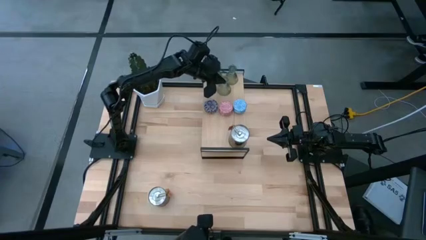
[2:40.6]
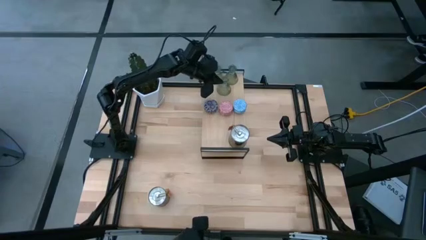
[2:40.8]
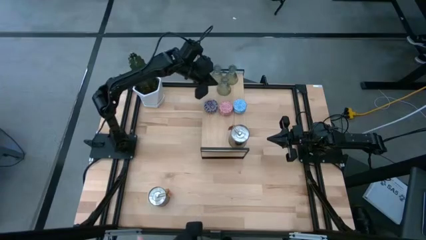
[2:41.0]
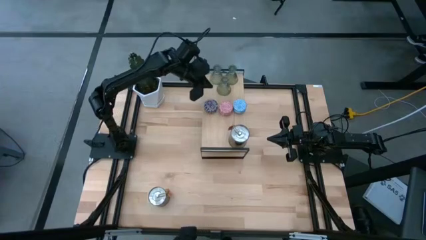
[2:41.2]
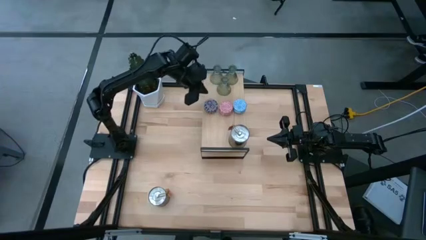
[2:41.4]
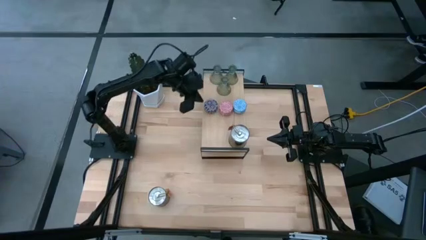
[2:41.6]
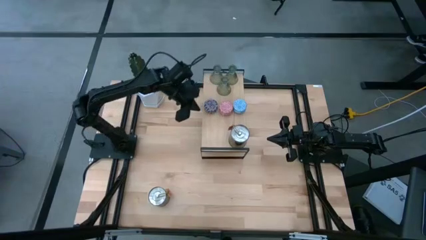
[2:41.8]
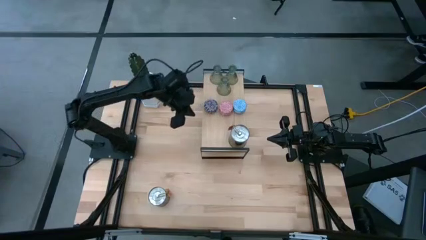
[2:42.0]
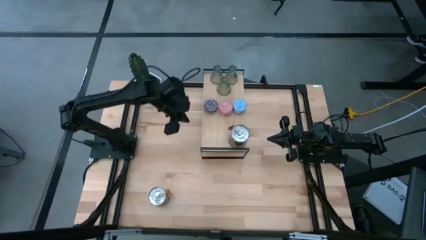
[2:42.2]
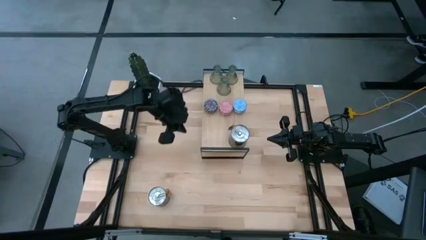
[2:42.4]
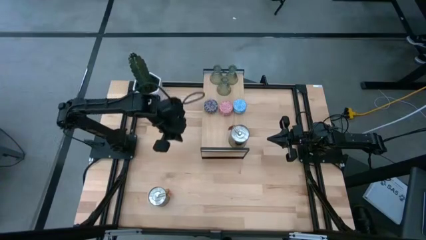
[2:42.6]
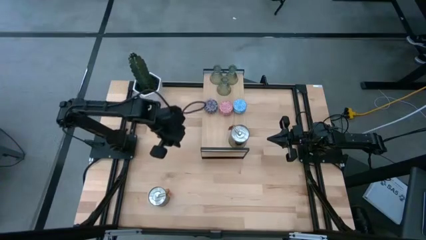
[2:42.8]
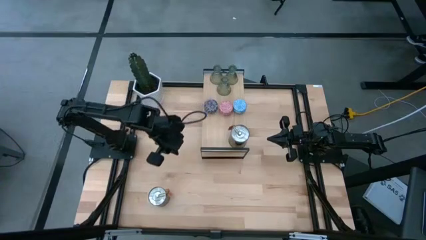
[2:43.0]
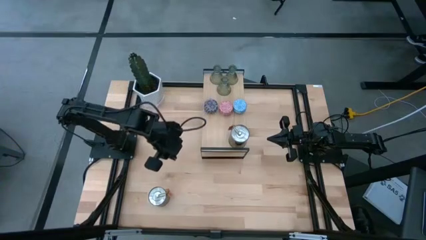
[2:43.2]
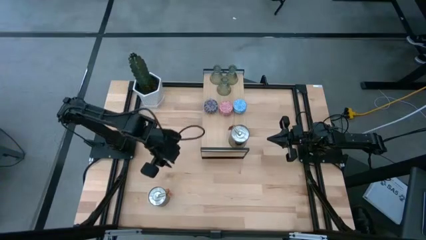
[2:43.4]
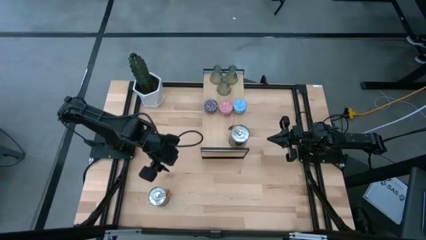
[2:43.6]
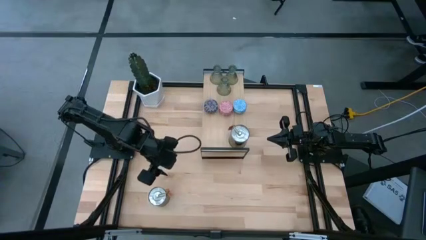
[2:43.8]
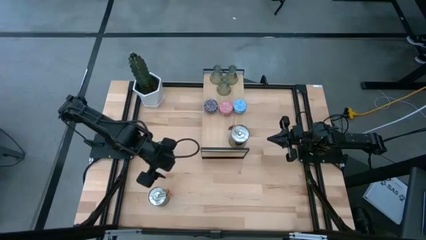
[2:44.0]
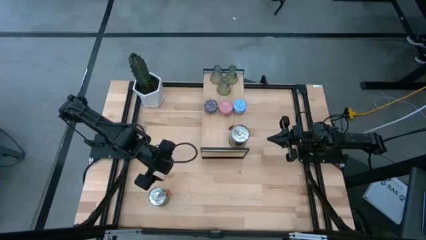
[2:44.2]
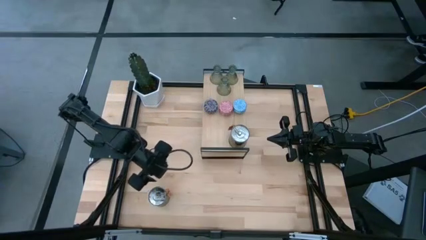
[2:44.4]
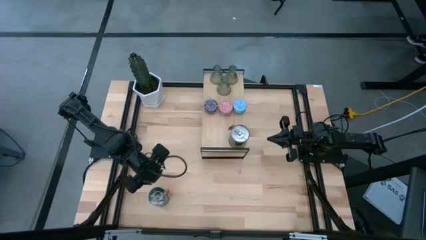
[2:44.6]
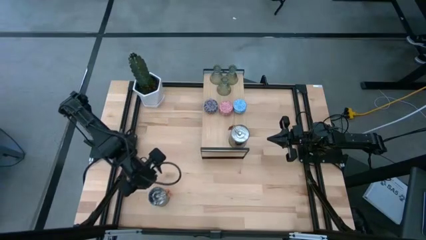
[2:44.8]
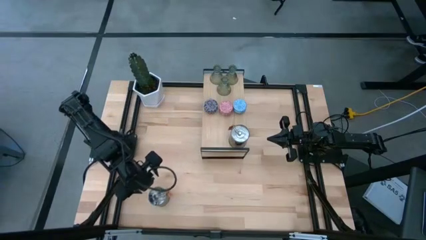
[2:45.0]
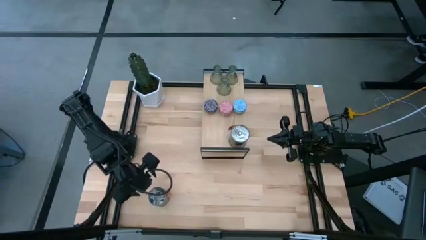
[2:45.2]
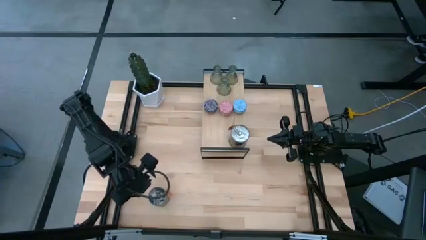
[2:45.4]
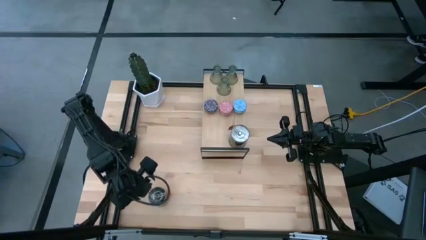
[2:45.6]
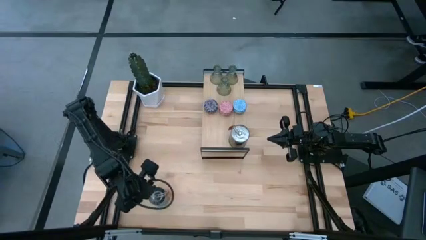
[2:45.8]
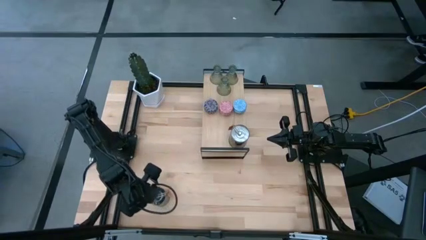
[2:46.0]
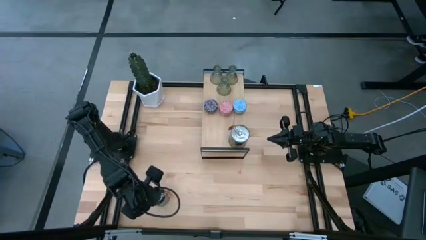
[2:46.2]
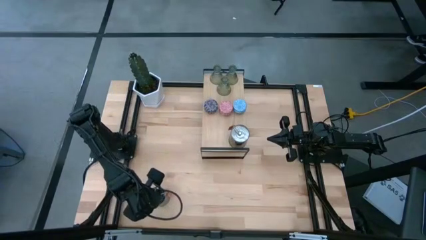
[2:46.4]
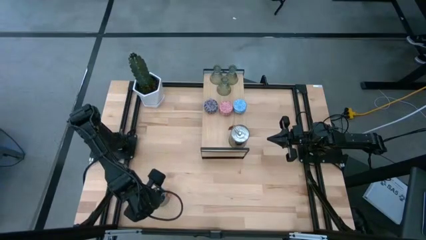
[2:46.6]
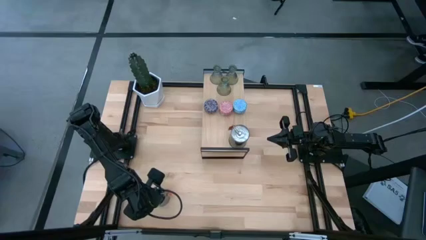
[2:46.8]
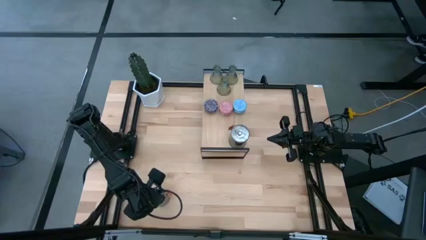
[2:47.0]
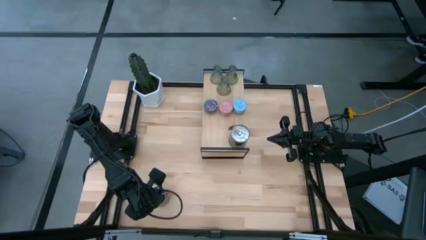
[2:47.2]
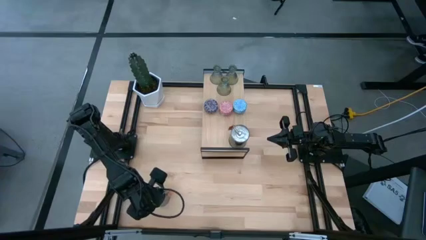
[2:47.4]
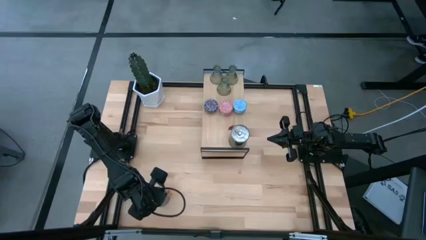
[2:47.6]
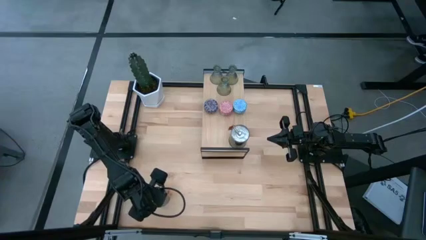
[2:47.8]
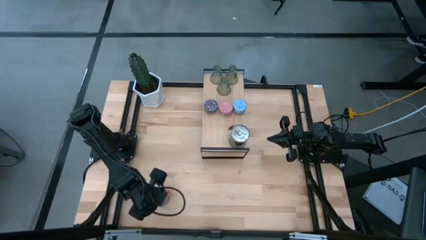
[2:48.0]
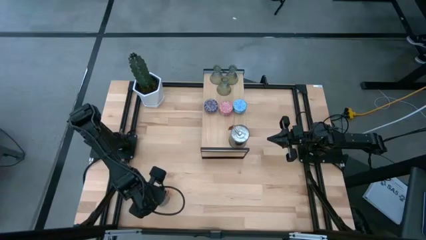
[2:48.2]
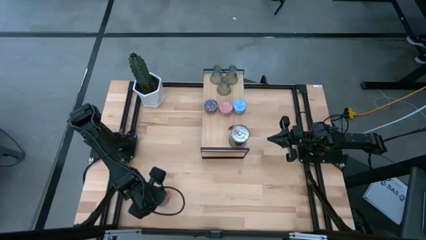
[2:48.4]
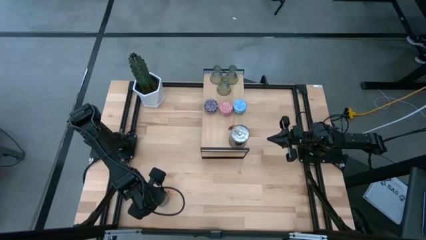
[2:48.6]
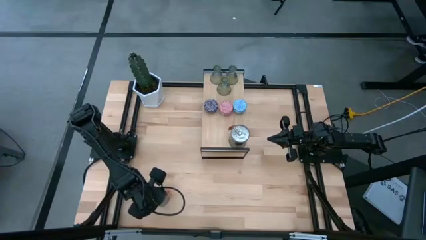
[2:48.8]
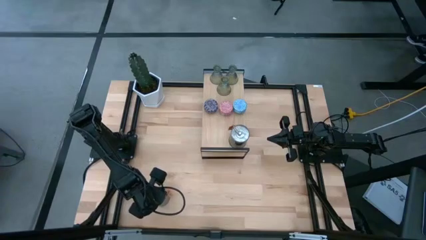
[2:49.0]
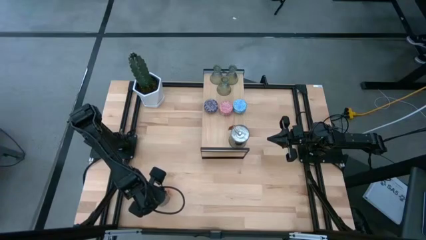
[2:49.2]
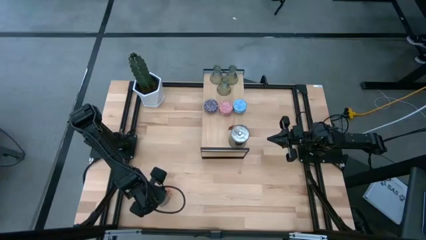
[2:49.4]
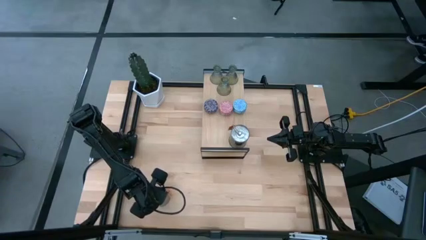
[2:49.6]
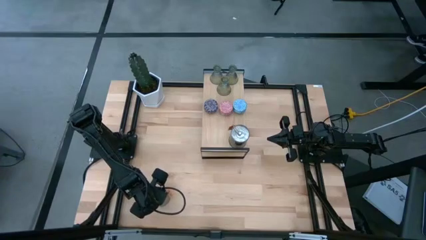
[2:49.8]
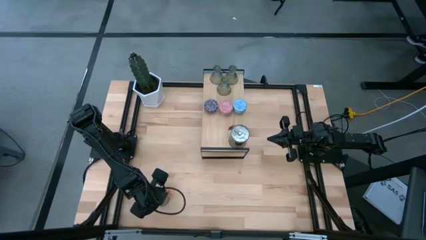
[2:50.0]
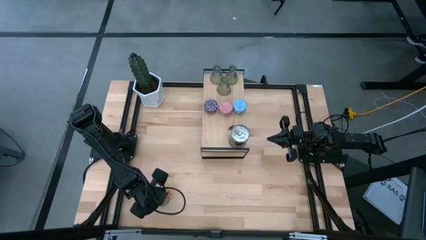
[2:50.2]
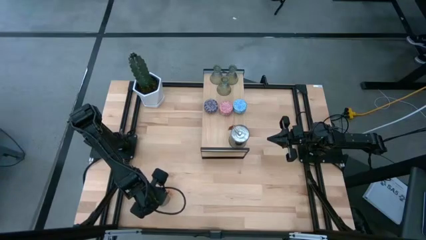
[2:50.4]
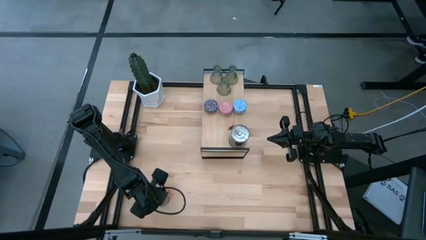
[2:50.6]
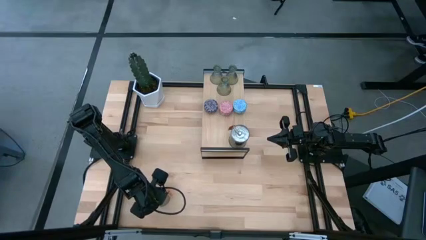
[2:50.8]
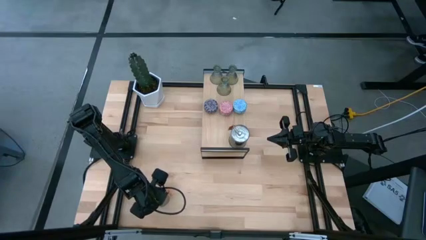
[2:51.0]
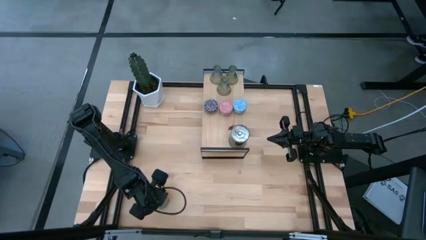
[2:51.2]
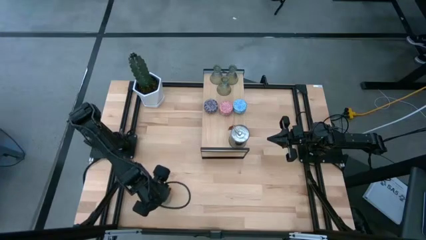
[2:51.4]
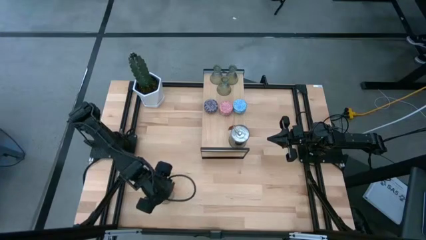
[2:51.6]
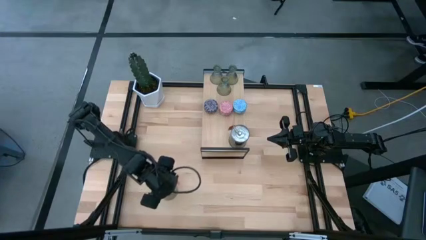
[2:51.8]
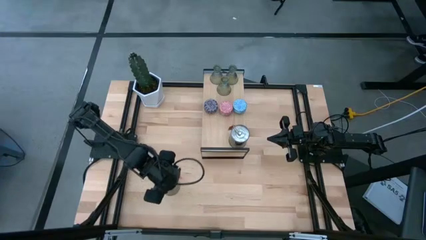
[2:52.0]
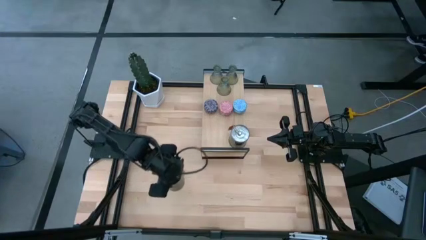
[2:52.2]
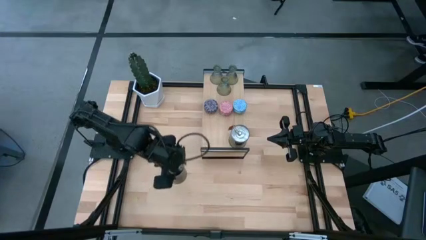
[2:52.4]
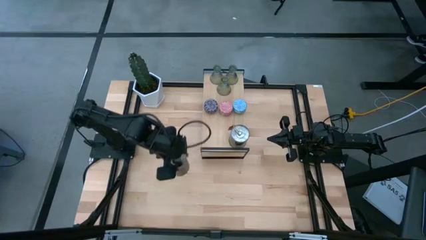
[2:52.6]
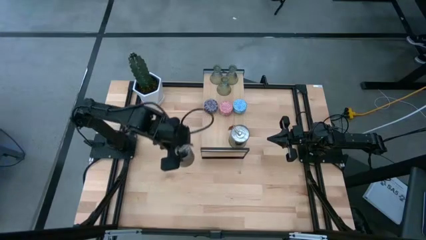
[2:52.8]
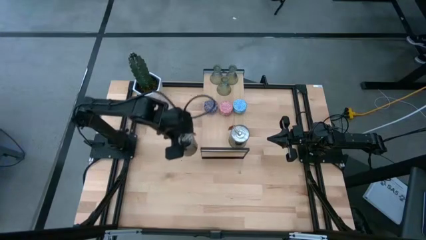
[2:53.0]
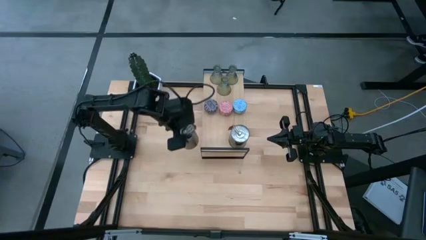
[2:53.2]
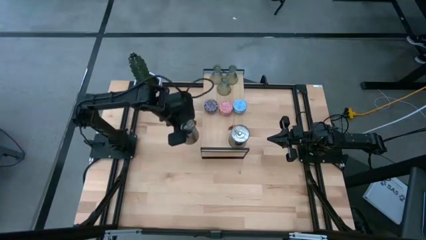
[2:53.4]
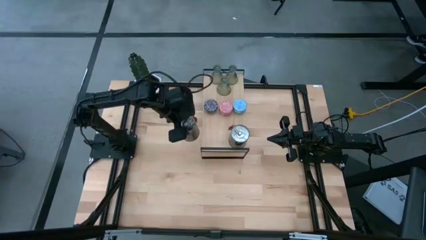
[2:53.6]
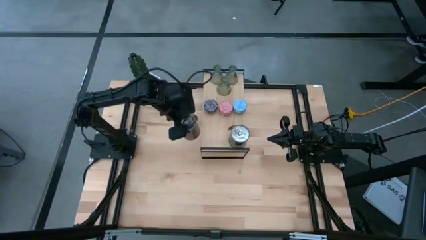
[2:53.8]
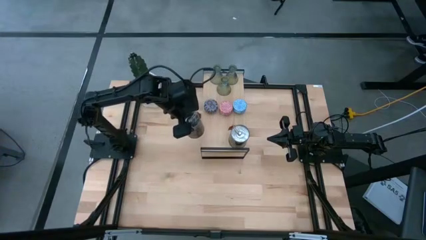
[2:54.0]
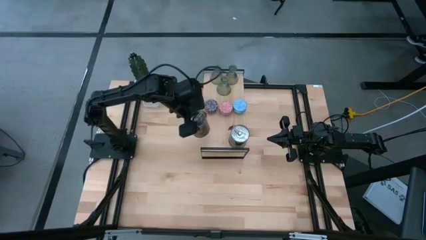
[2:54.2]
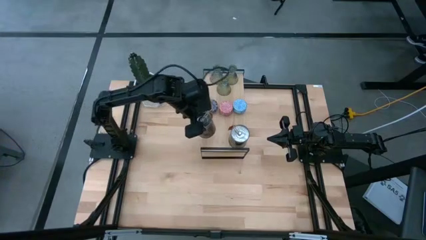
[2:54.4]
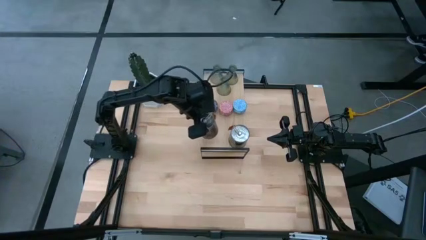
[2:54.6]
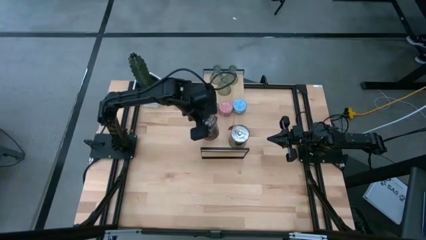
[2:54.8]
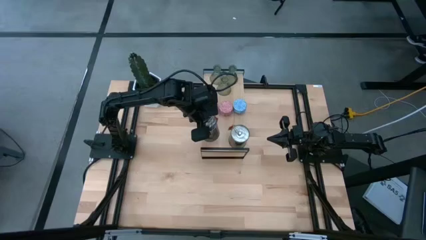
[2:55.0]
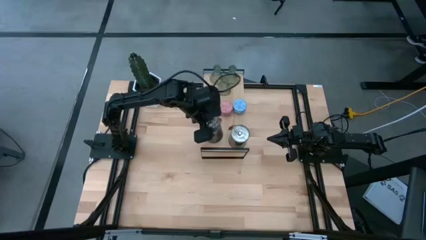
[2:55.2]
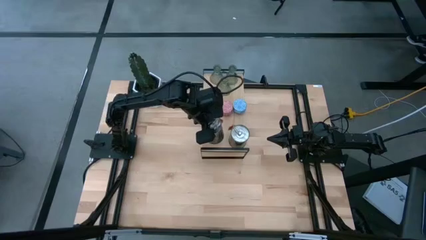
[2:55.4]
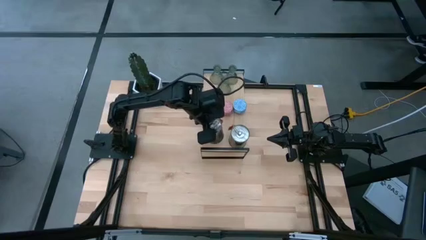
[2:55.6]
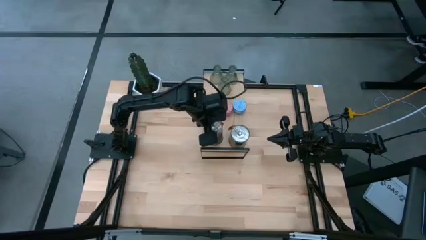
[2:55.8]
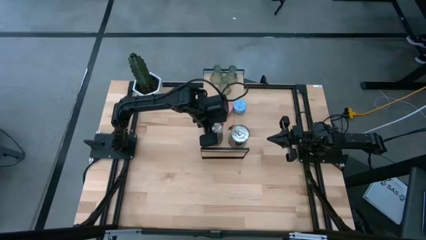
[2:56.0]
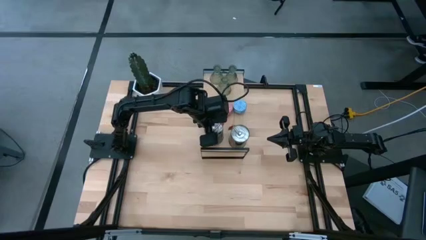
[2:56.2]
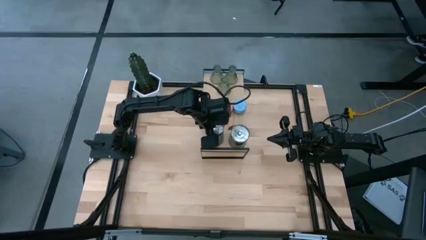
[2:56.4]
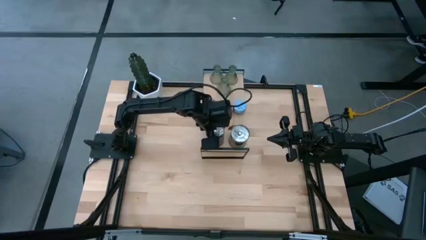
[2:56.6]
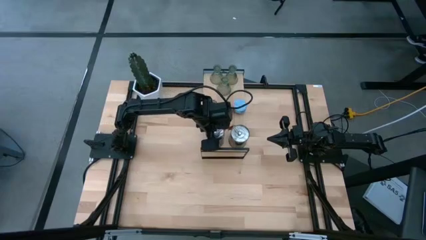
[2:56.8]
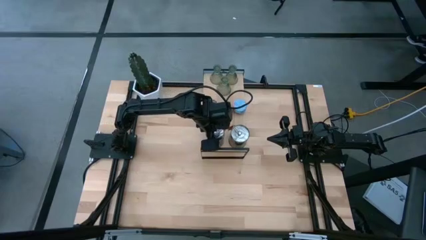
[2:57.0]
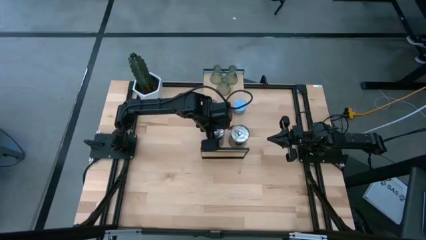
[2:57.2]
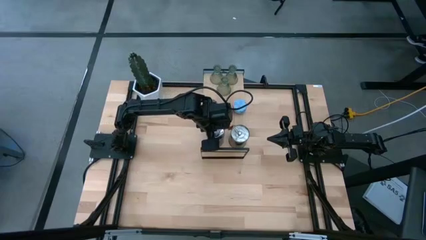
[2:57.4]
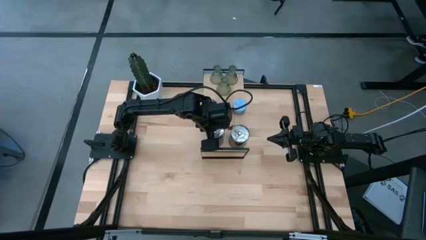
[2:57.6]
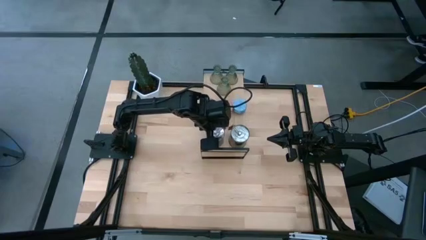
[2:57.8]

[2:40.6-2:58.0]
Task: Pick & Place candle stick holders
Put the silver scented candle can on the shelf
